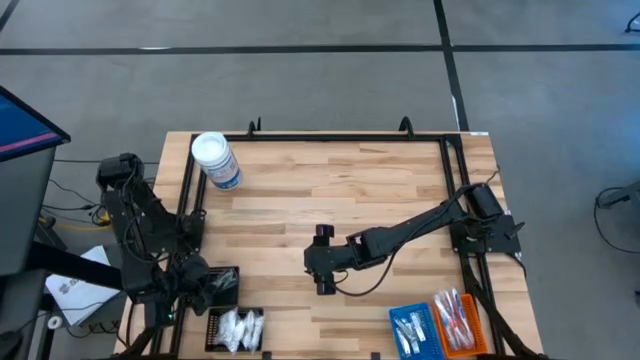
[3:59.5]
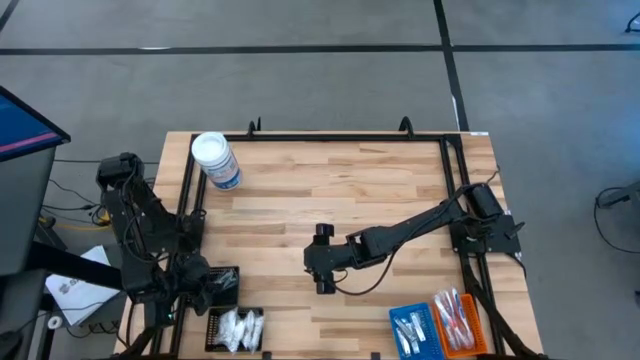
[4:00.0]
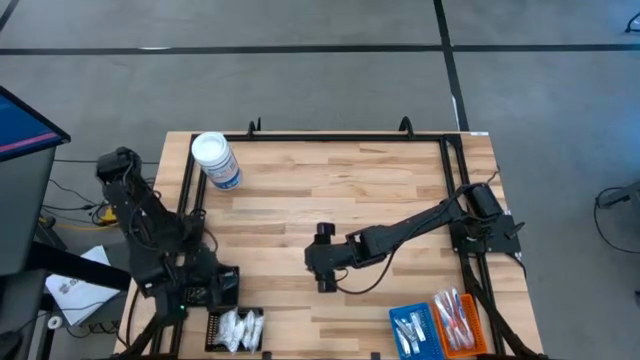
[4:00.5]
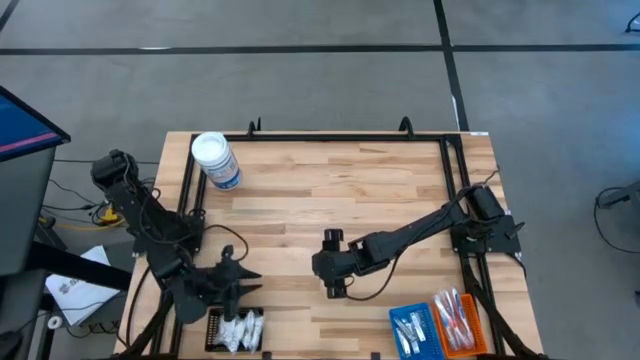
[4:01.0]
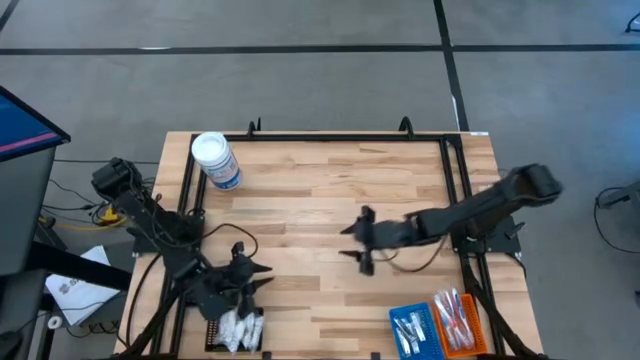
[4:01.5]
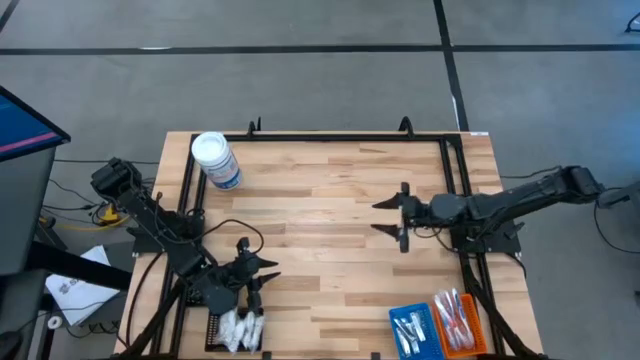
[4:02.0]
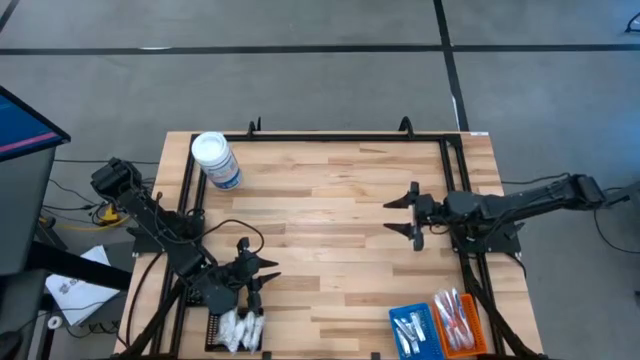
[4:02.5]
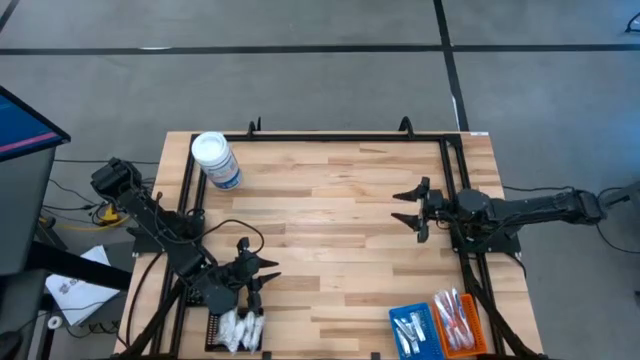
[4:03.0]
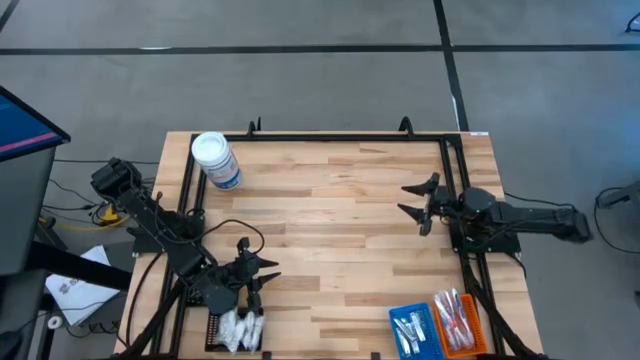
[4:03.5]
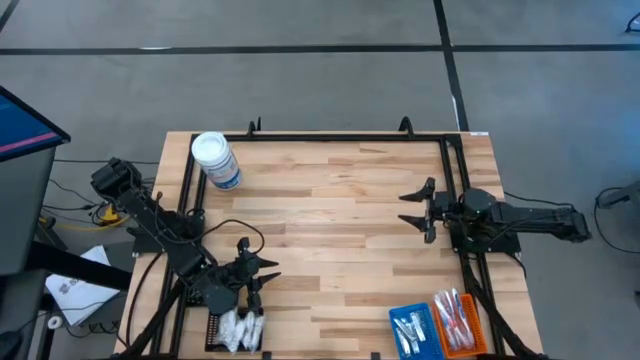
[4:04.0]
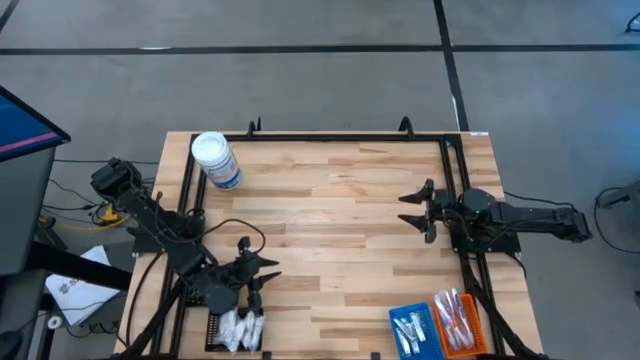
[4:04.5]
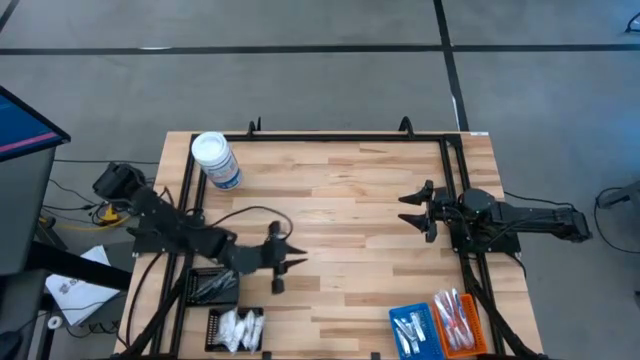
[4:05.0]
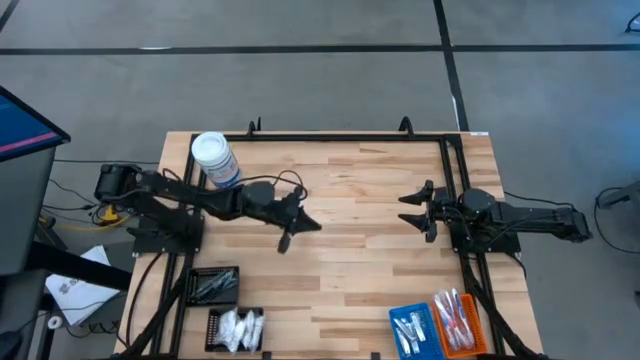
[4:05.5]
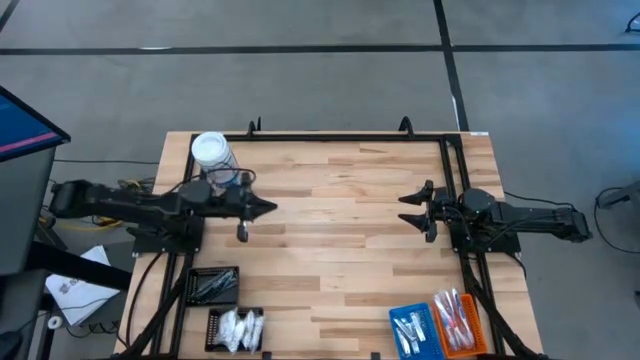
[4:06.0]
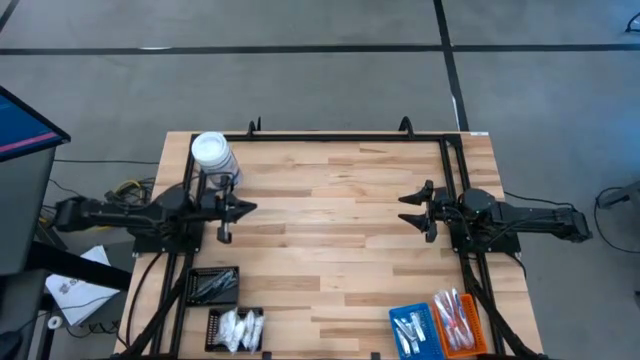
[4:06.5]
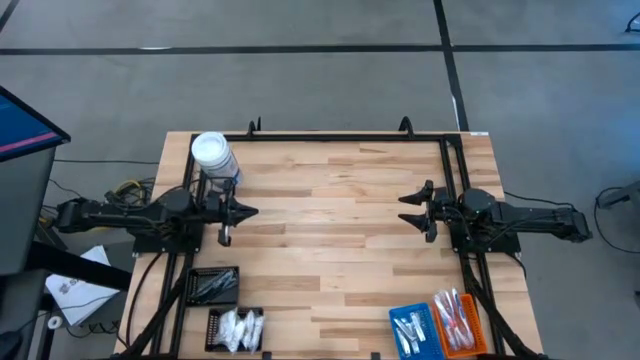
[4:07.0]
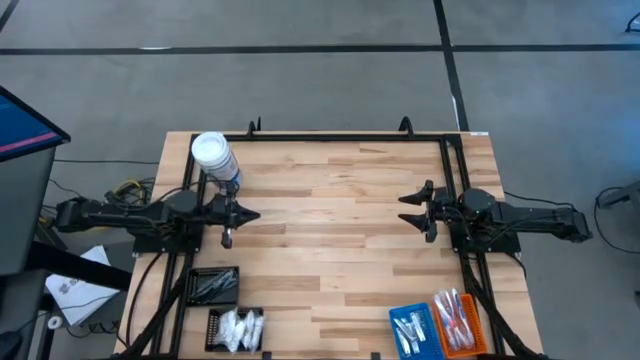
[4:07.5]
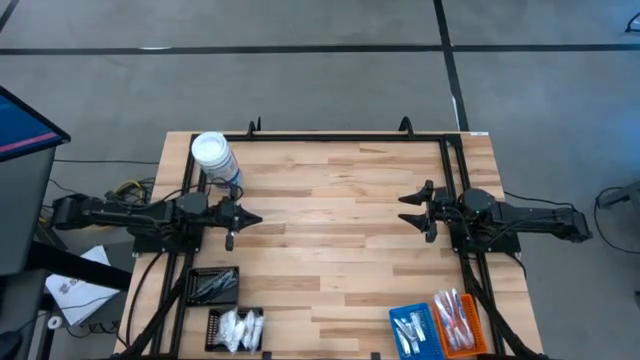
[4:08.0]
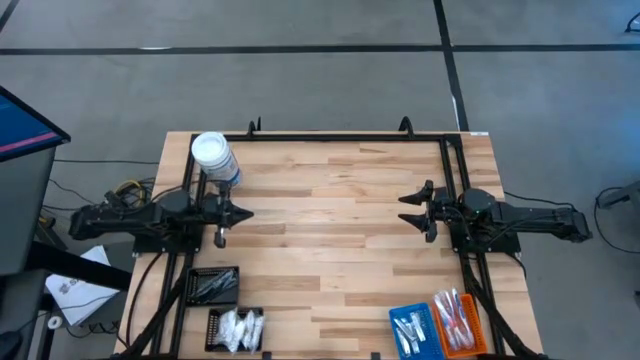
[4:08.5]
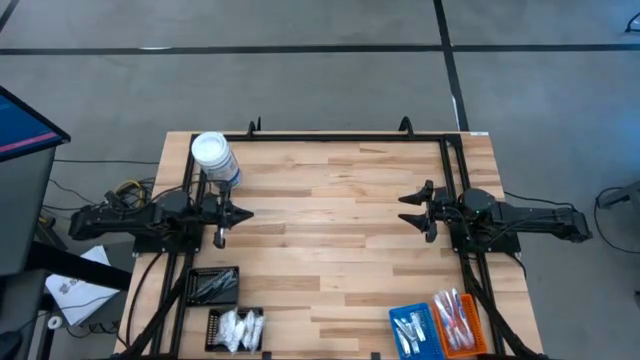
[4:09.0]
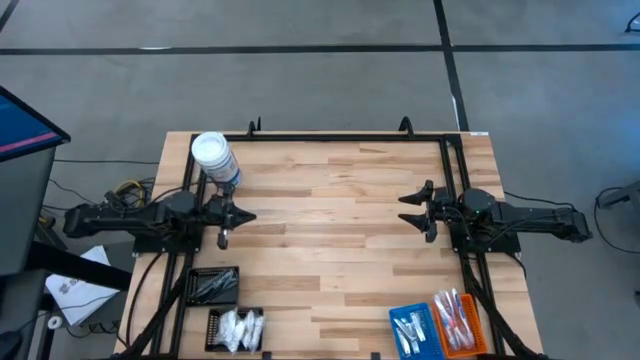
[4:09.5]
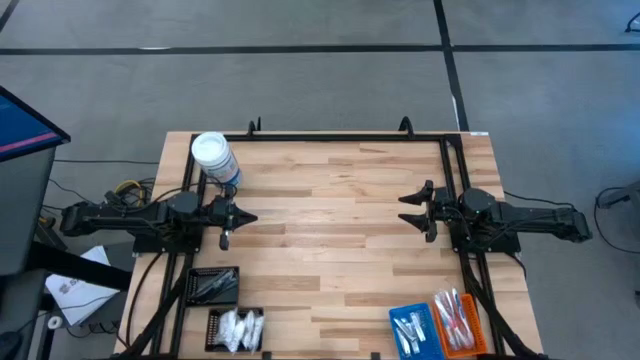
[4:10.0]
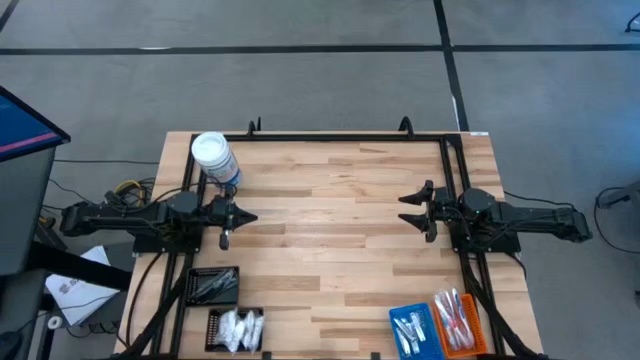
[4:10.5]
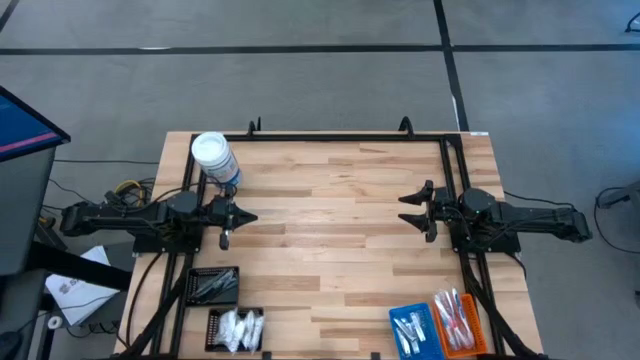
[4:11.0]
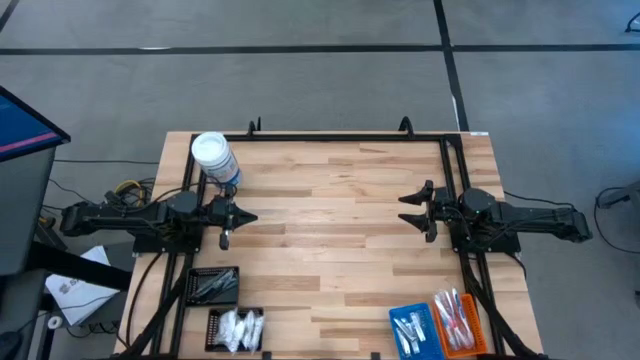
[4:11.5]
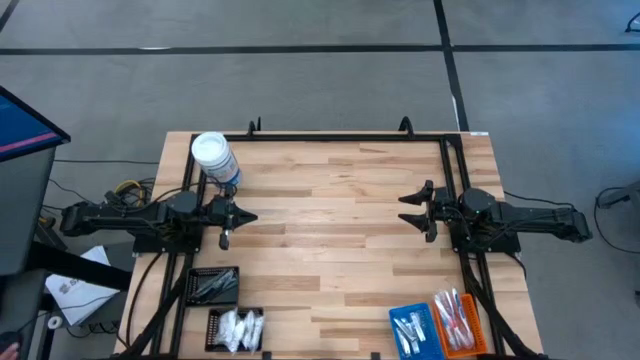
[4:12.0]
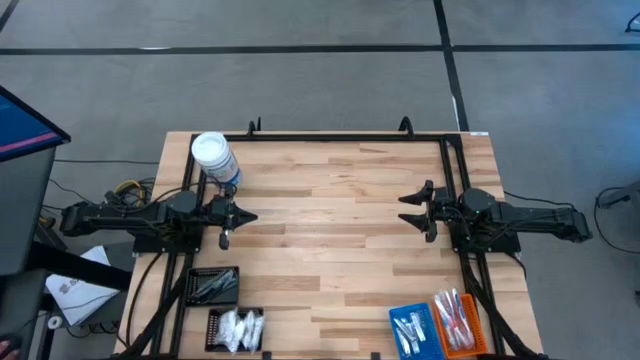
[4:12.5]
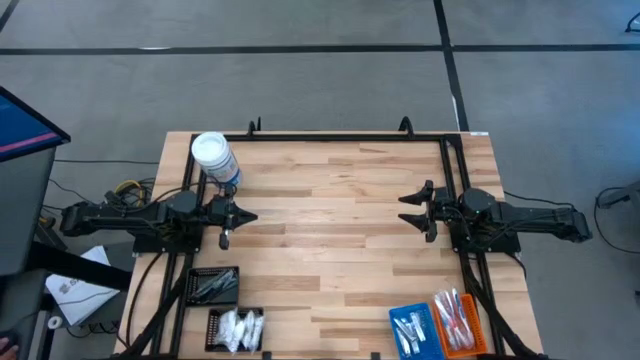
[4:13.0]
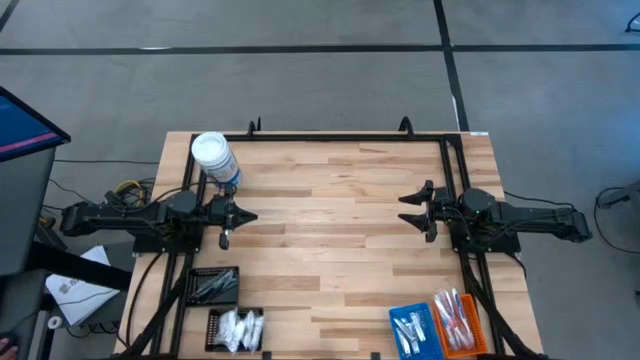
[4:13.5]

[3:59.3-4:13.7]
Task: Pick & Place Travel size toiletries
Return to Home Position

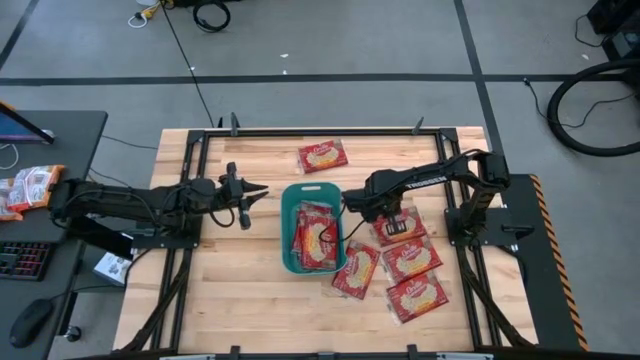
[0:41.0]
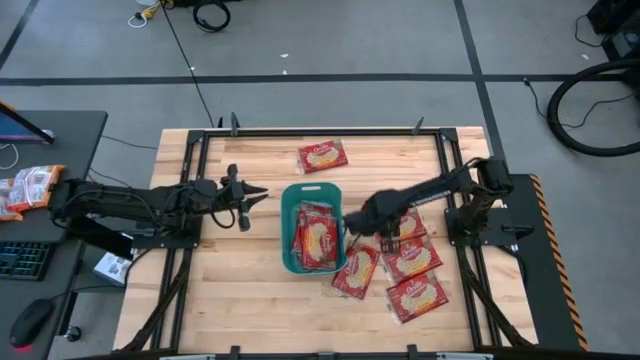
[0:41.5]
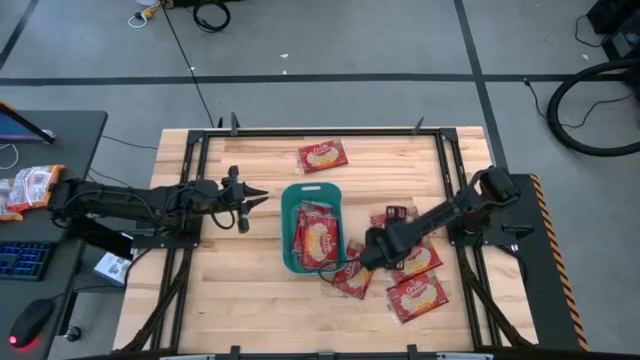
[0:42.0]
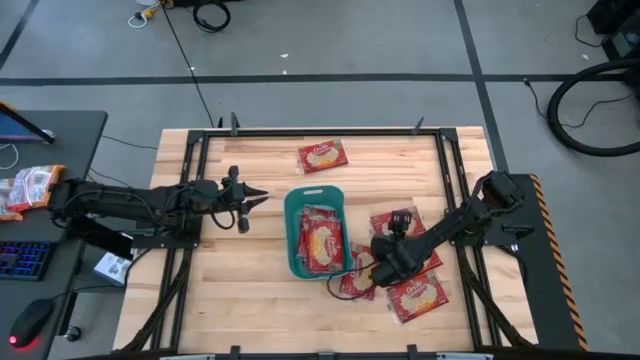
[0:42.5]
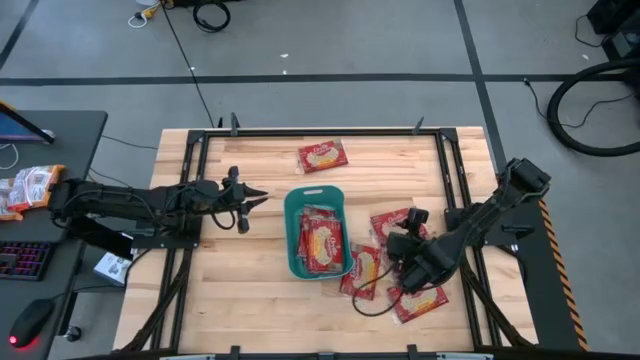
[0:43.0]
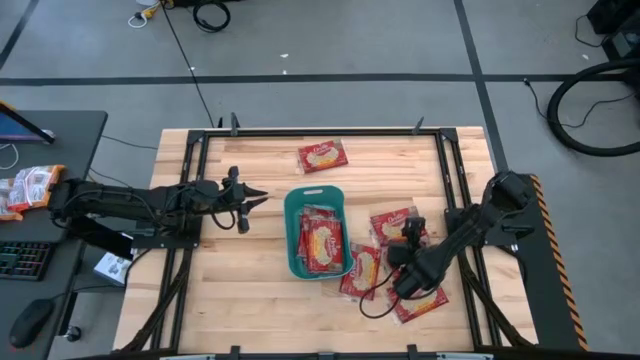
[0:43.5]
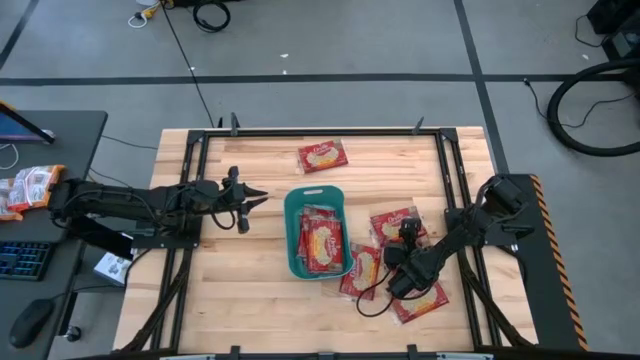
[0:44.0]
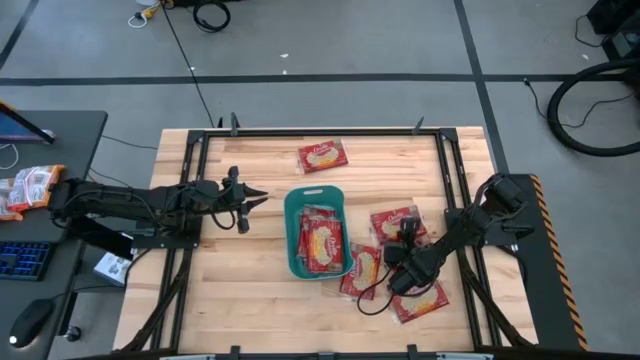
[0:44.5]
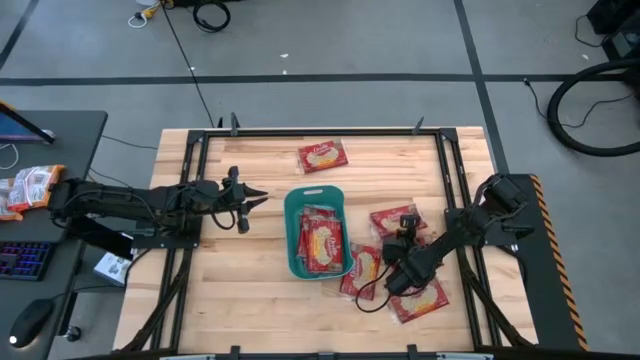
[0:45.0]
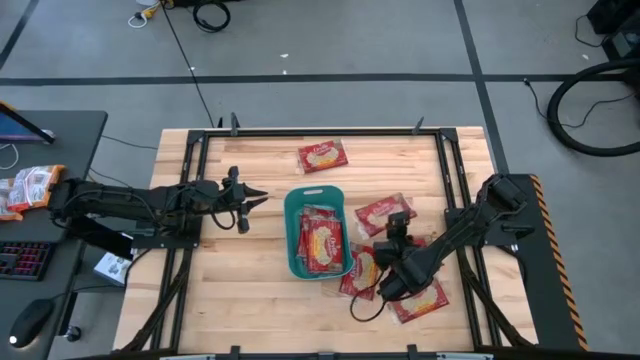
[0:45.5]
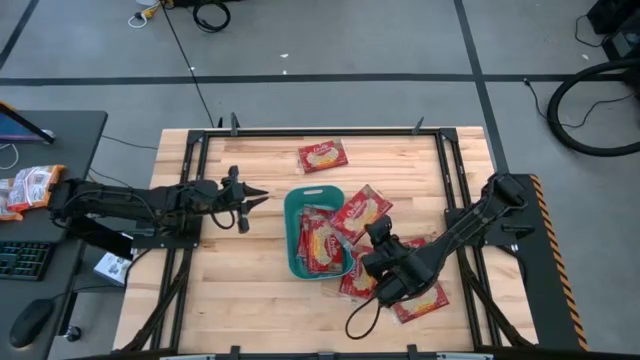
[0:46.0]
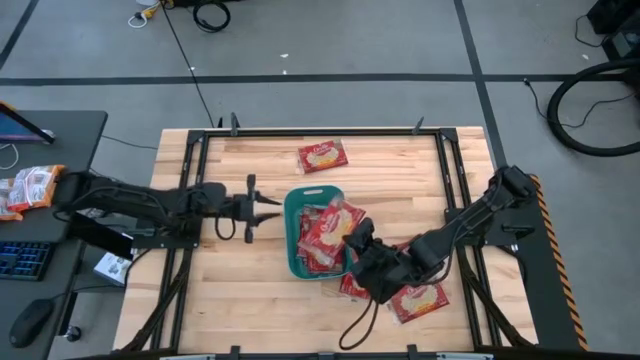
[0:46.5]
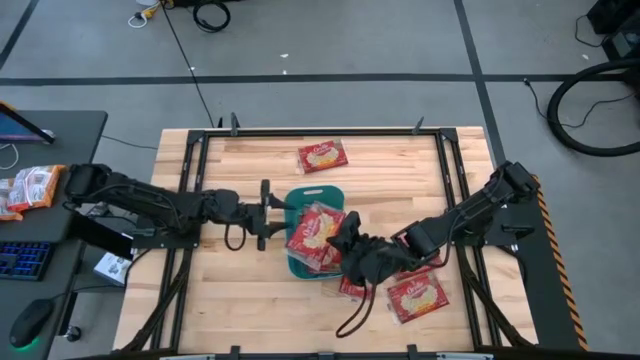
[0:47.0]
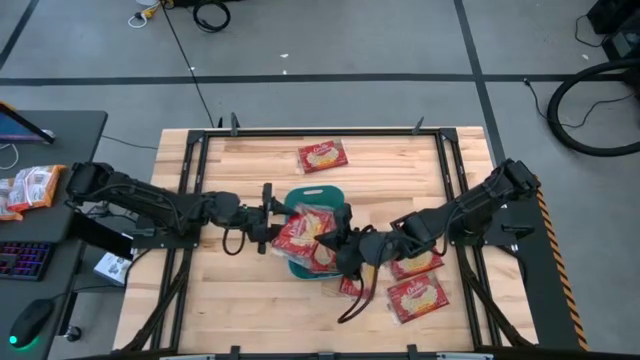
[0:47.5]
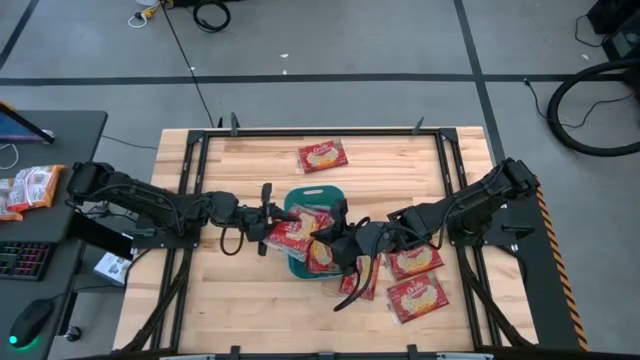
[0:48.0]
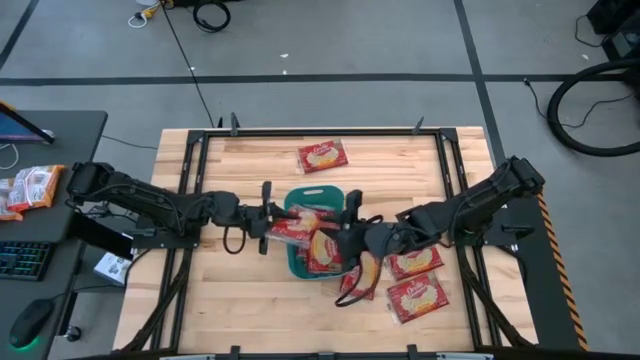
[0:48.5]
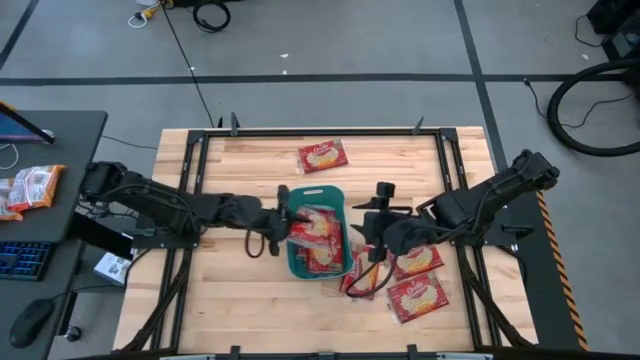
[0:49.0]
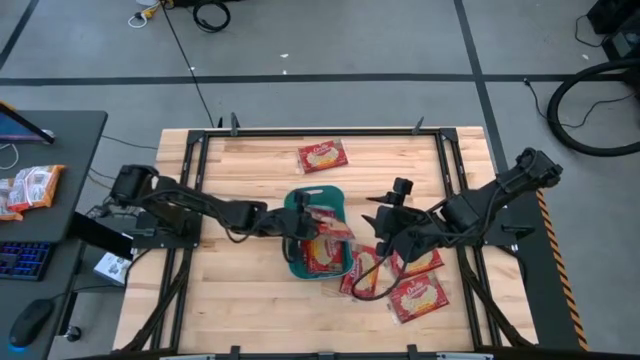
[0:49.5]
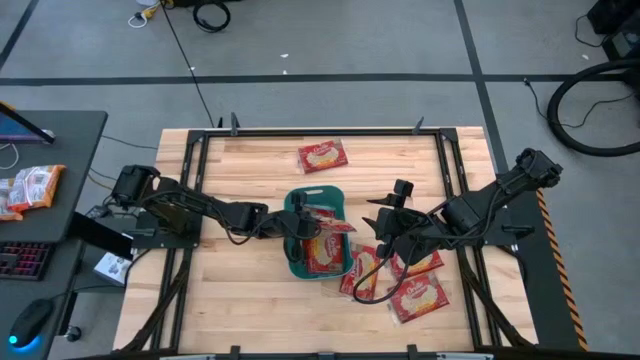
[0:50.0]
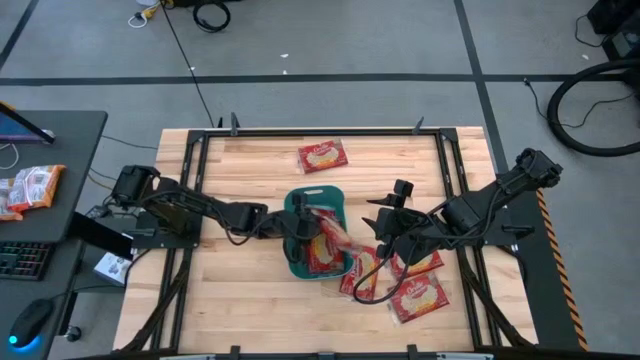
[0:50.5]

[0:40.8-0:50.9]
Task: Sort popcorn bags into baskets
Put the red popcorn bag into the green bin
